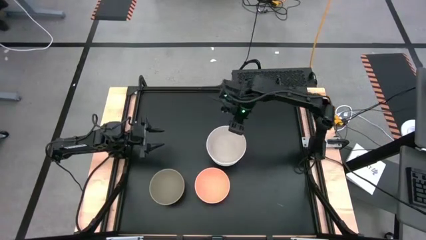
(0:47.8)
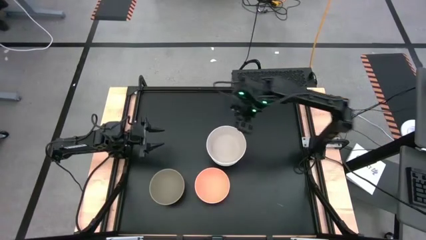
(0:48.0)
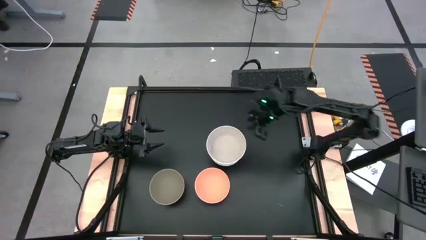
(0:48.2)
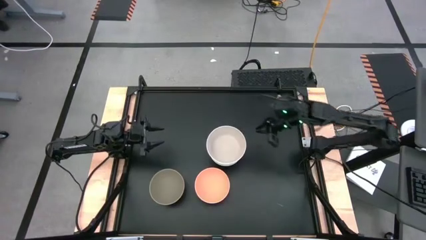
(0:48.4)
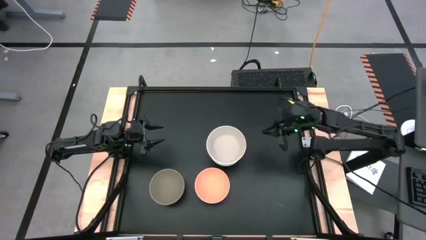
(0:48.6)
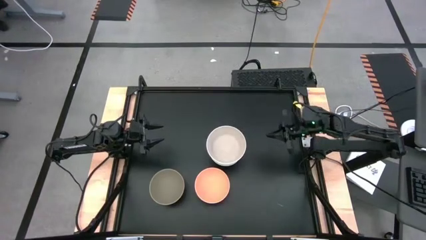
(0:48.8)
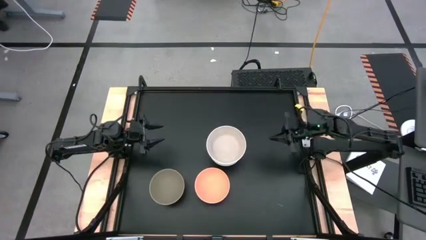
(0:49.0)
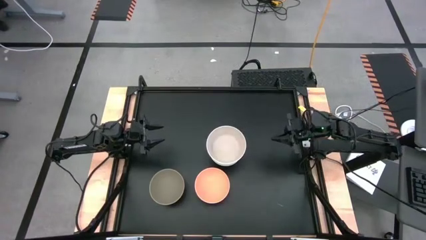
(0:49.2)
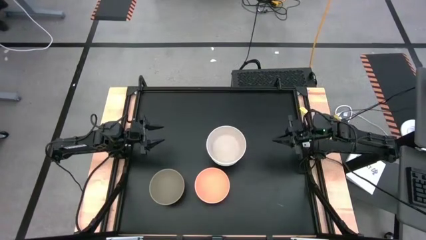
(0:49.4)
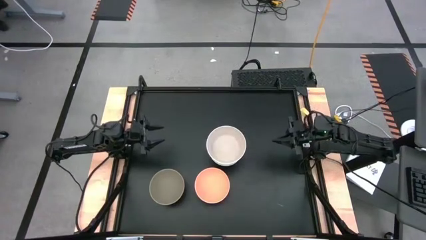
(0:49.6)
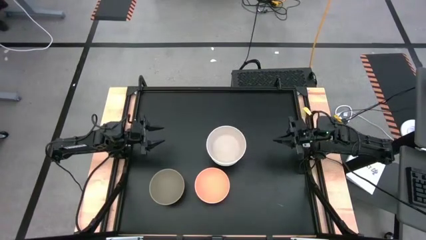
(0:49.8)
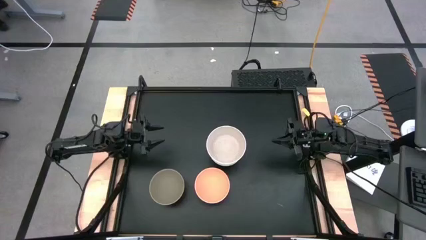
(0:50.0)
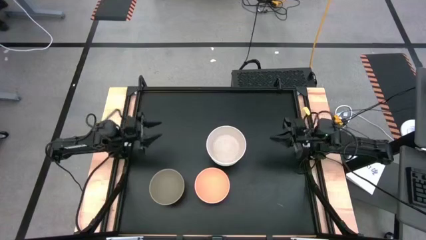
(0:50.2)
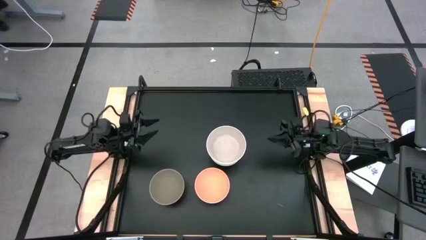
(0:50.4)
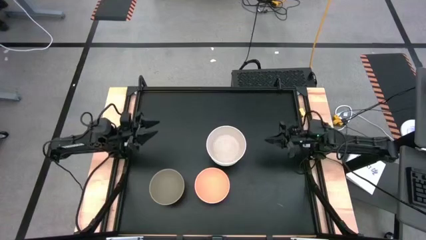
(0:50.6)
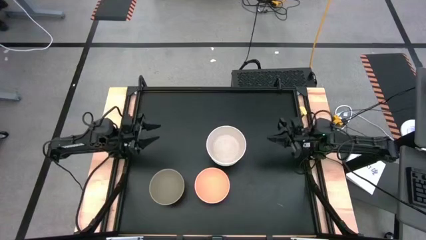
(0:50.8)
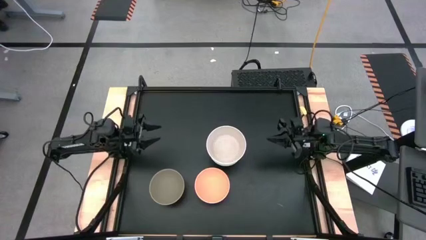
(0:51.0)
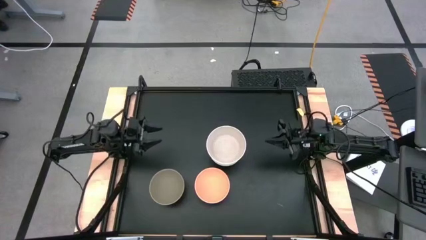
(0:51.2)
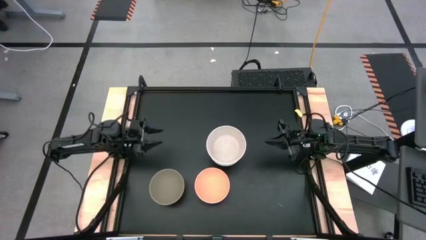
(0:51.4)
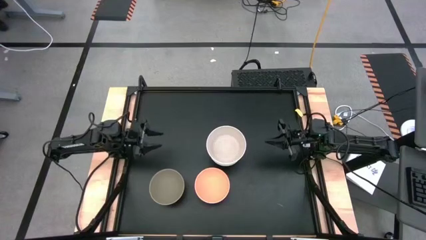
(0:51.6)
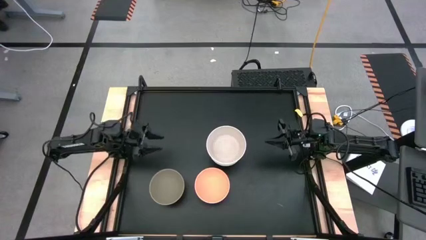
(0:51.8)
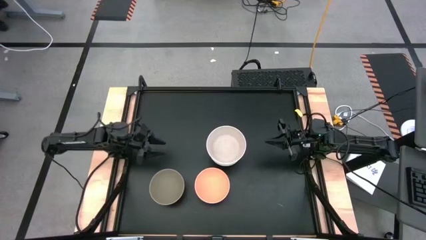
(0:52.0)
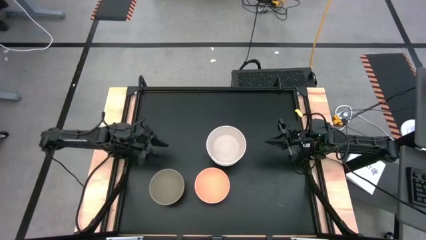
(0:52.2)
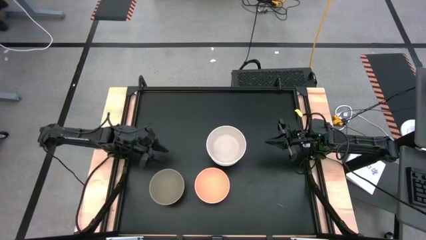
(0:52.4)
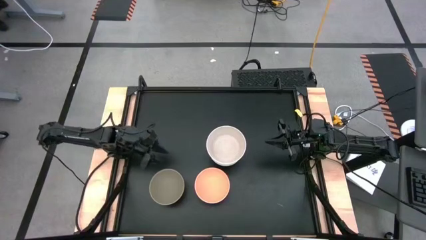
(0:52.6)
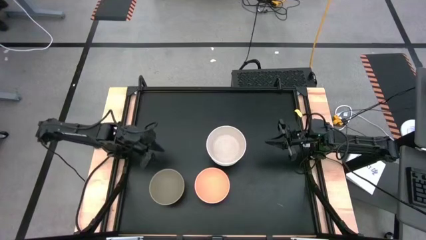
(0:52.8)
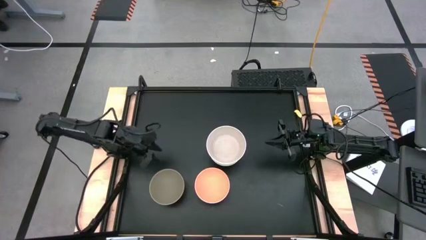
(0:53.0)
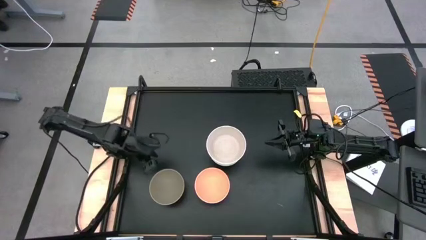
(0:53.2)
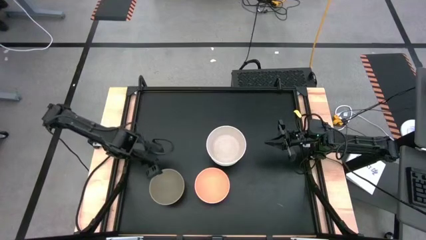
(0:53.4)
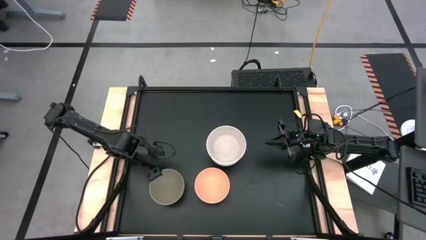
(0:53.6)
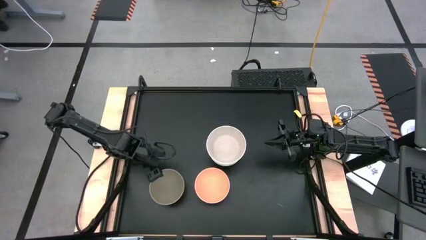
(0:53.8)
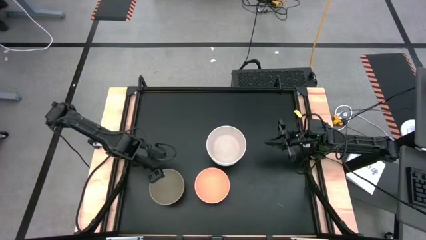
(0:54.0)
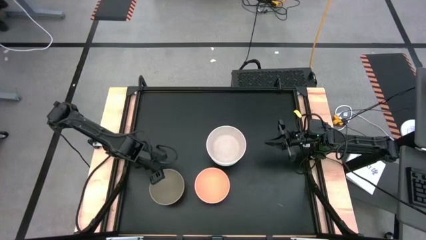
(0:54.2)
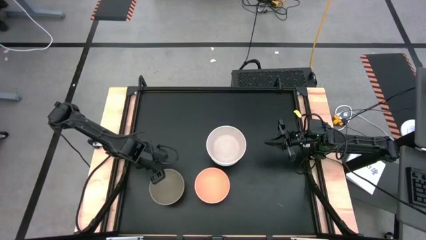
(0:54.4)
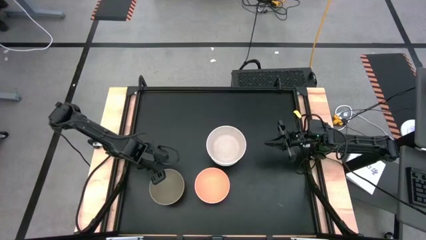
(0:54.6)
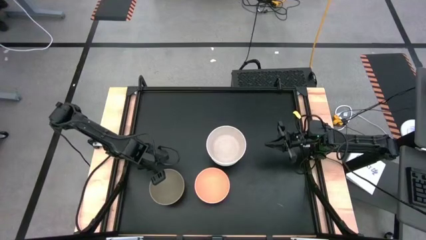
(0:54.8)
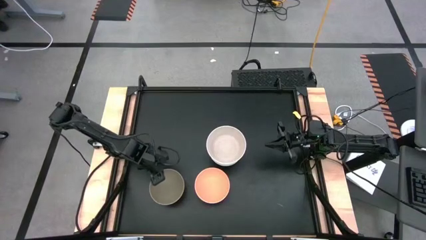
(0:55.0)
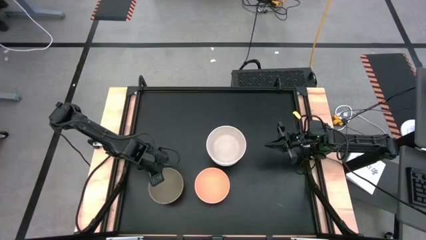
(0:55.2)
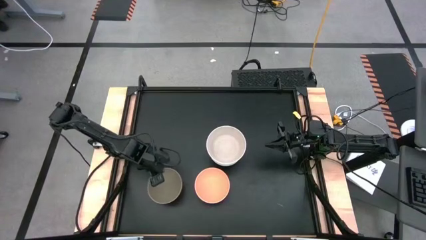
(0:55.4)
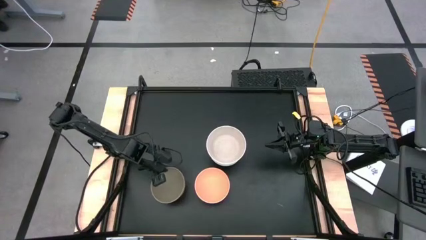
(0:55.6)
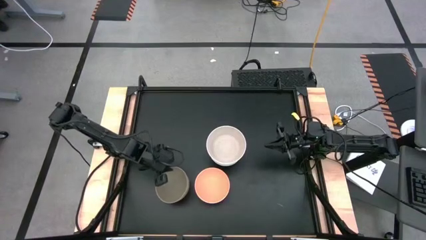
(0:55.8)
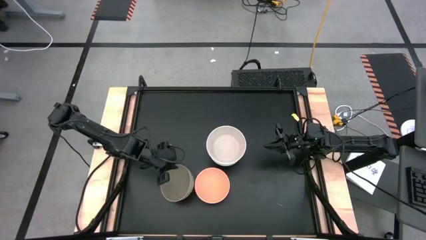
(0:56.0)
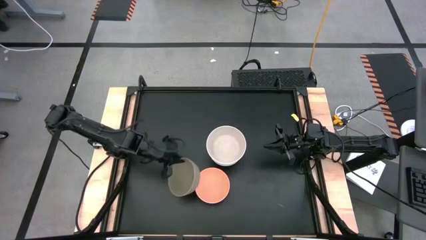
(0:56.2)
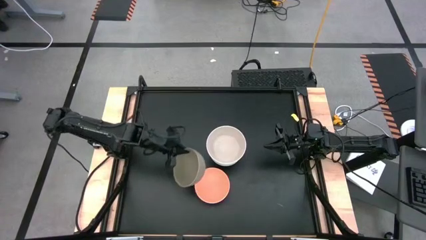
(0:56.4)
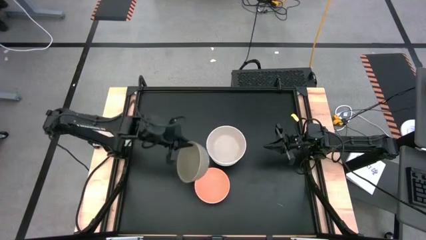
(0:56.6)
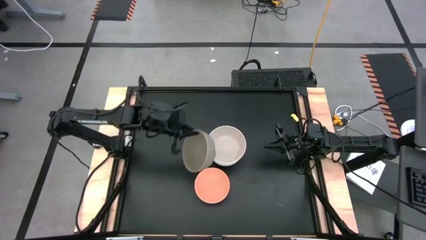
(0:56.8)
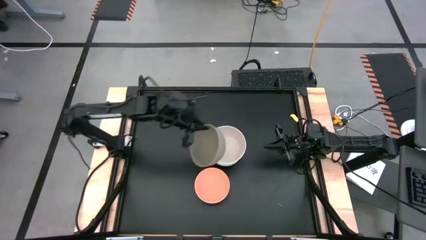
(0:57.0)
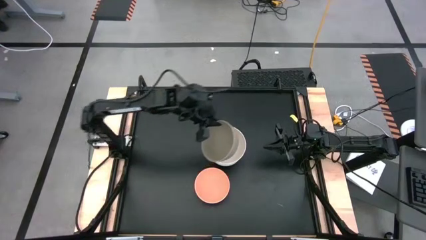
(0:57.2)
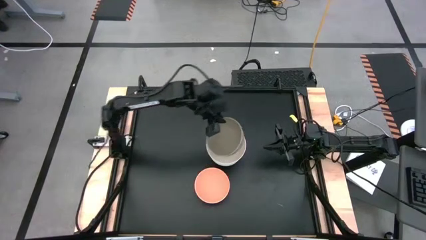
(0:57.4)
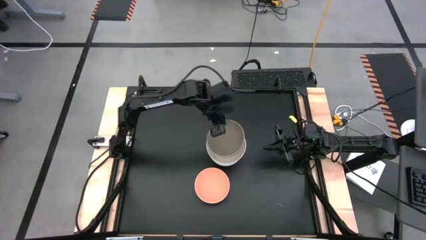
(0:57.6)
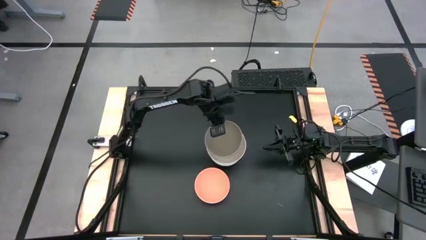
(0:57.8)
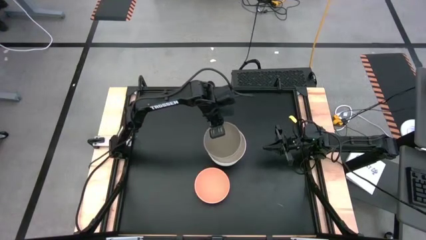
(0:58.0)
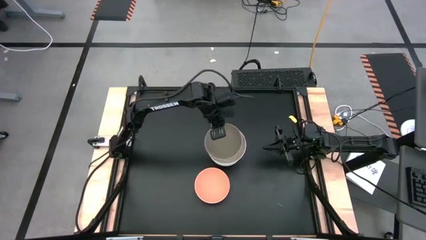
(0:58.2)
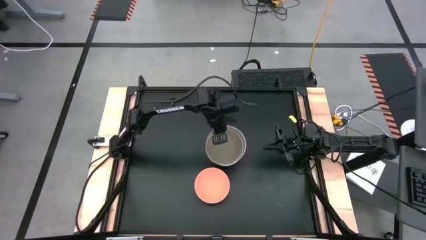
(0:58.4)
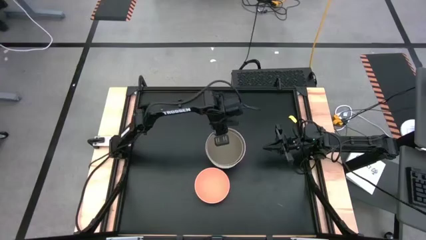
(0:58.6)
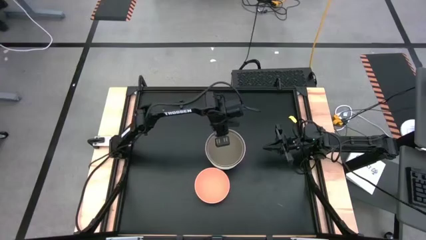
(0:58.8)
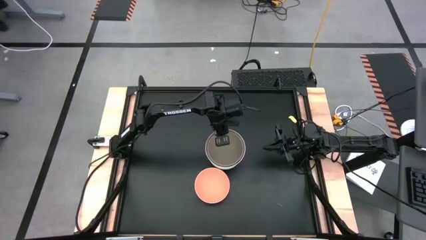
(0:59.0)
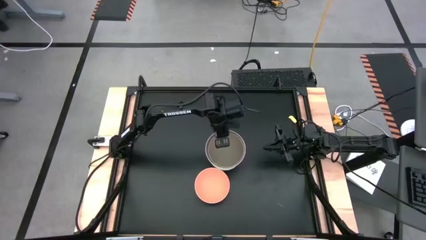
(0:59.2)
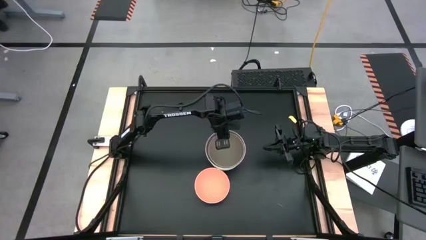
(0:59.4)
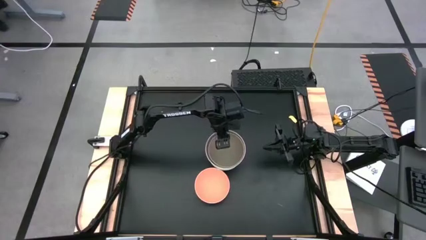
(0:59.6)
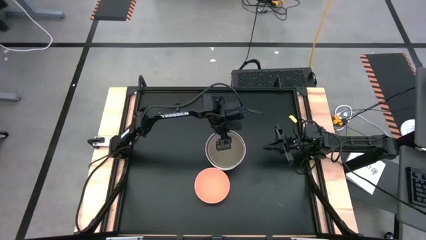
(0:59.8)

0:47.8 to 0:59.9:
Task: Nest bowls inside each other
Stack the light gray bowl on the dirty white bowl

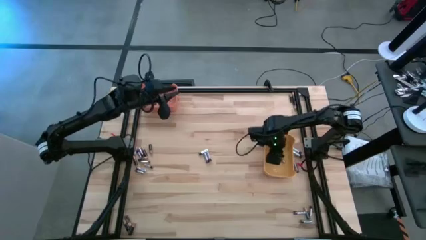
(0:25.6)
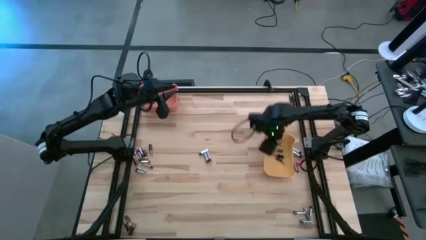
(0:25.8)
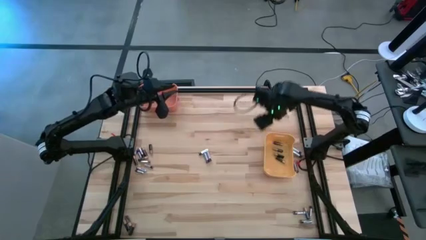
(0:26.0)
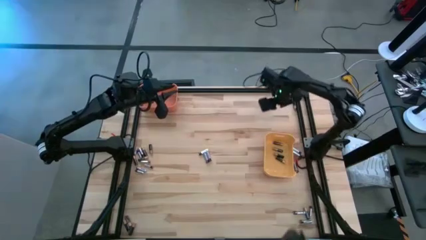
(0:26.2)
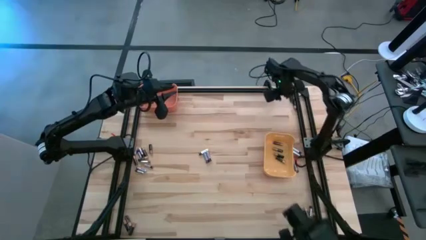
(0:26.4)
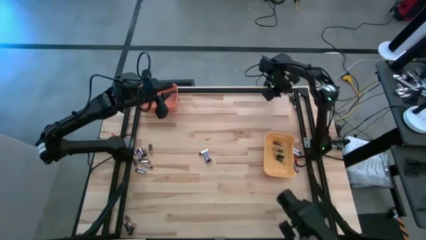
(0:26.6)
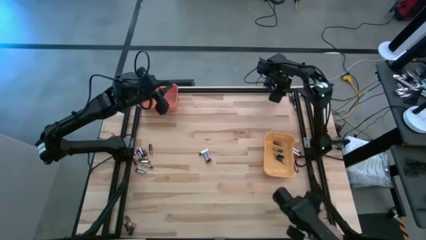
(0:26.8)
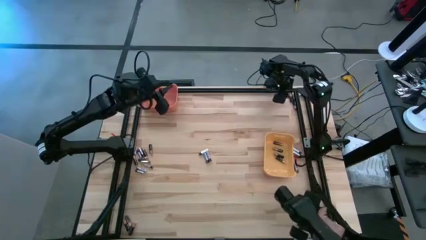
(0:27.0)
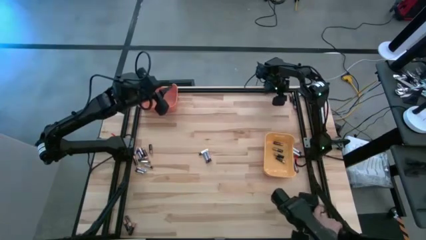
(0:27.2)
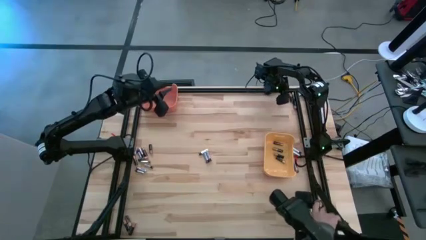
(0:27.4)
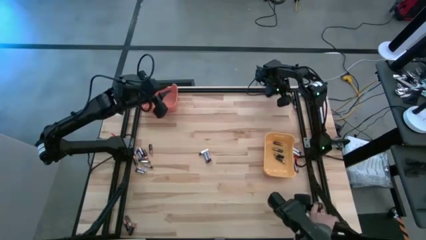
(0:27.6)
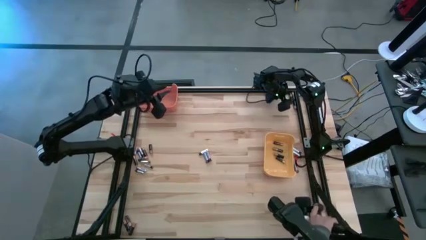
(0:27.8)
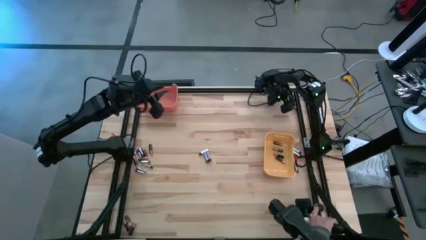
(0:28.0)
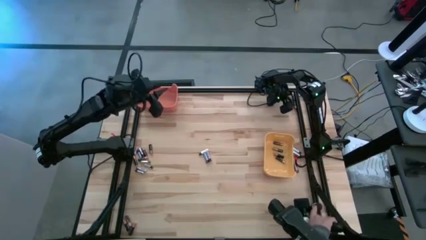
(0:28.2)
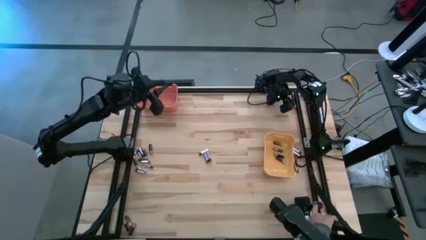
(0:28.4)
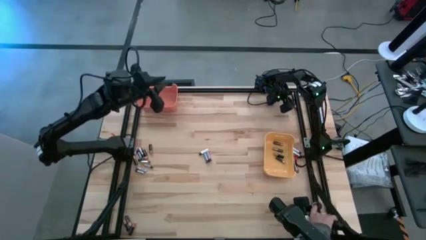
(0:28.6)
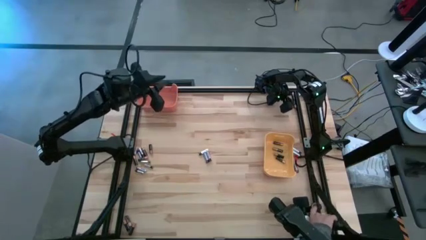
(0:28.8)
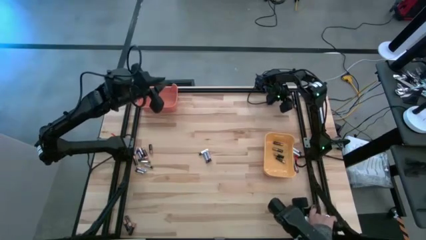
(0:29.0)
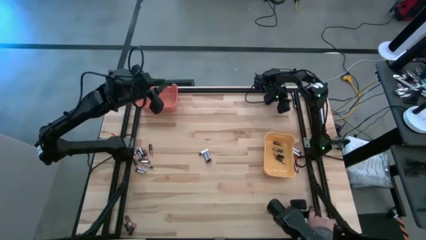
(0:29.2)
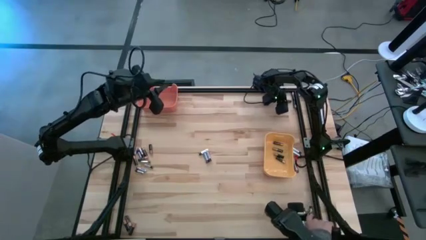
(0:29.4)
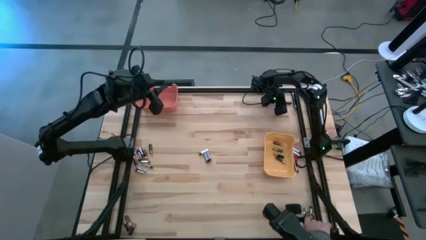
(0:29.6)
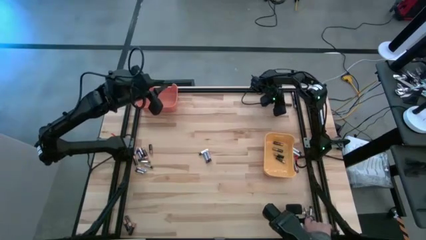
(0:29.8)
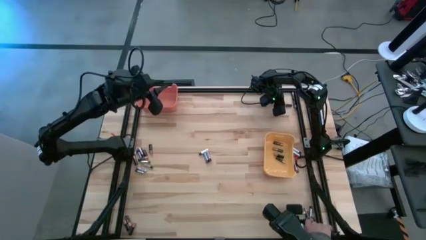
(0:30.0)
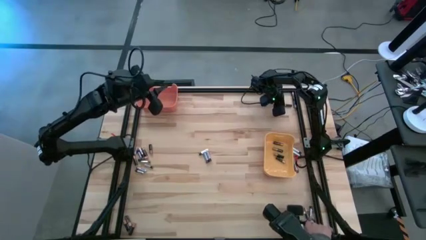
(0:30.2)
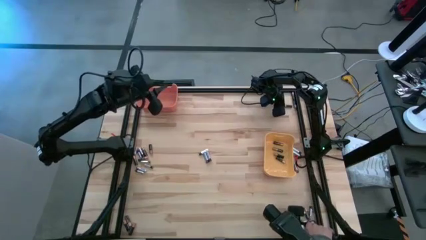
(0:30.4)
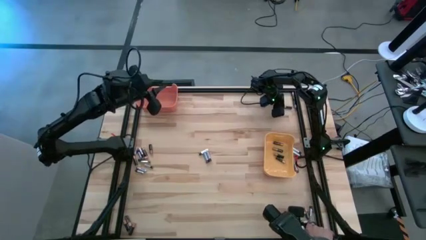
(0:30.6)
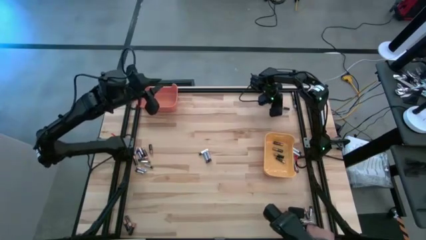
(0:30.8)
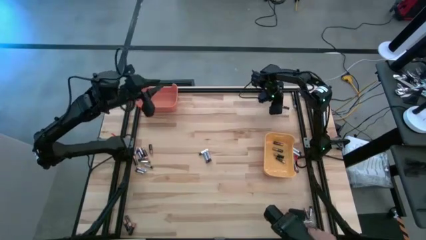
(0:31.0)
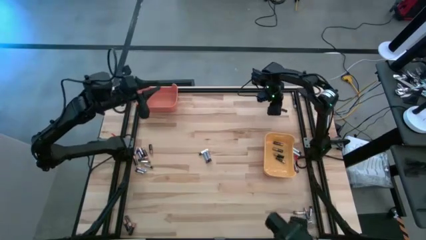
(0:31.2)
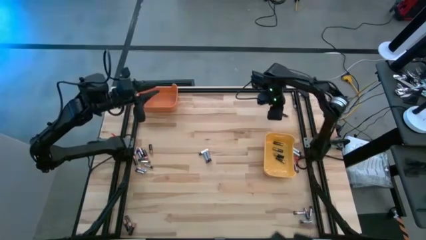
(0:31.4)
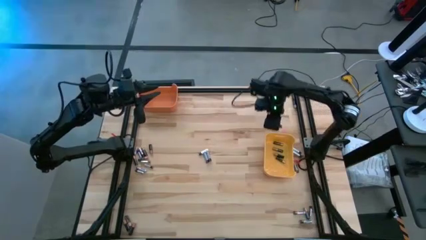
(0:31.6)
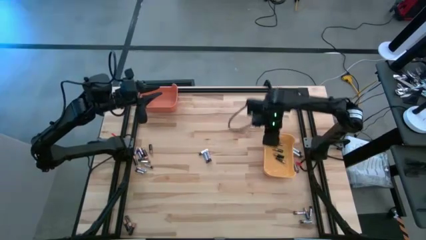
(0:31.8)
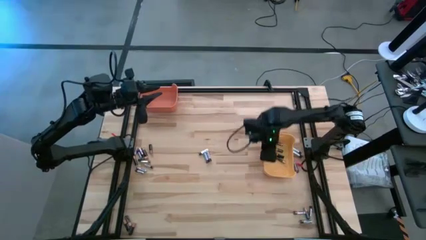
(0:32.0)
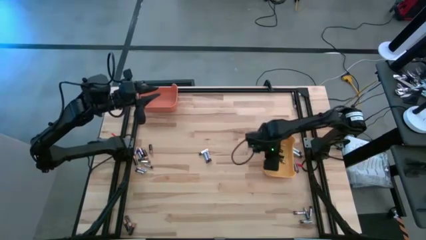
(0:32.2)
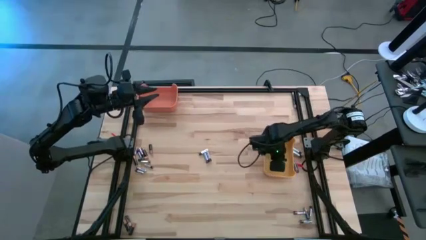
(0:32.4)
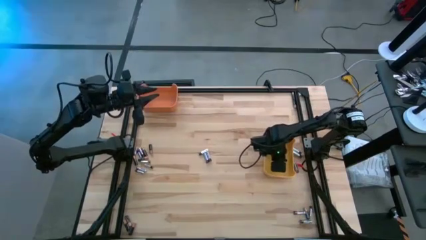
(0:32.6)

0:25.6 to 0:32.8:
Task: Sort batteries
Put the black battery into the yellow bin
